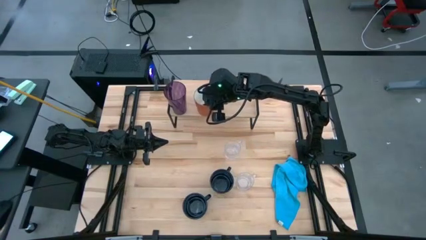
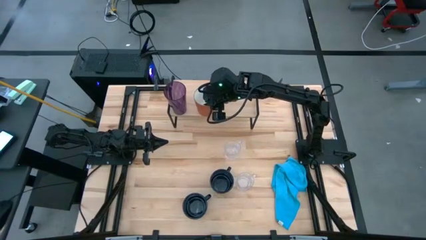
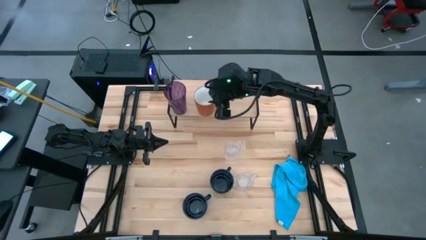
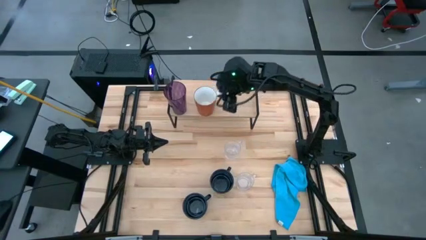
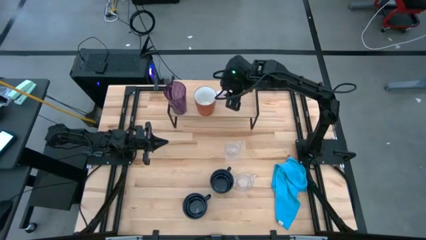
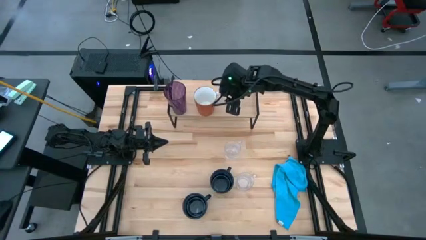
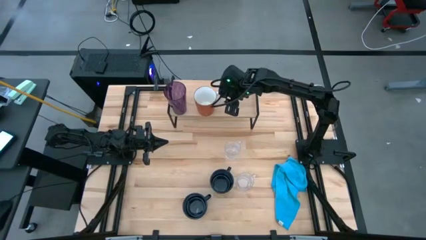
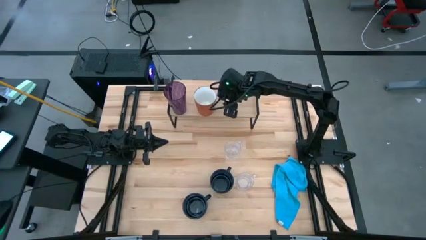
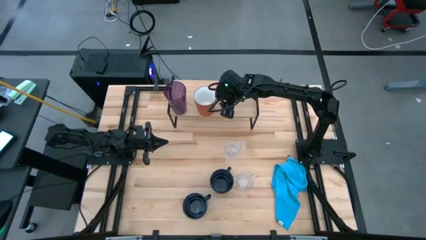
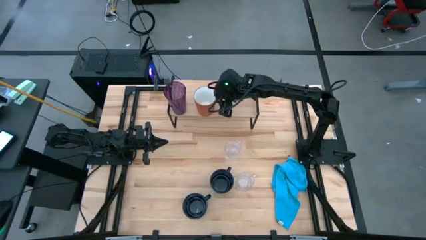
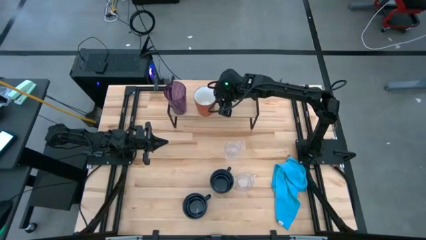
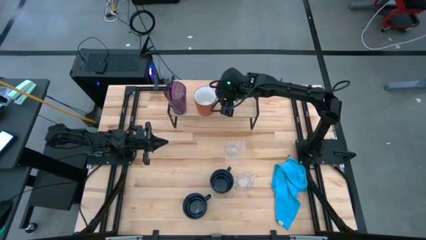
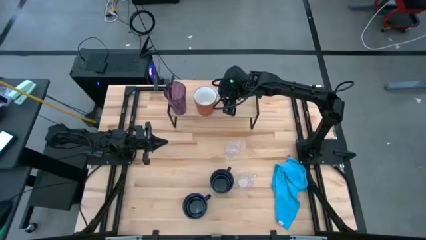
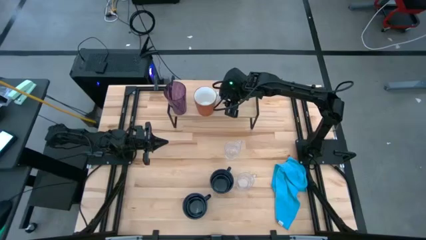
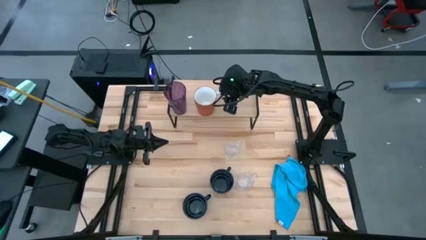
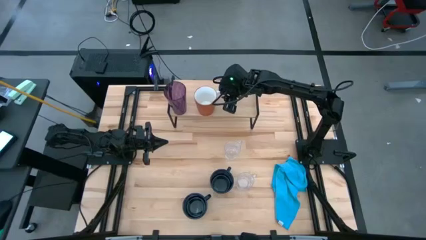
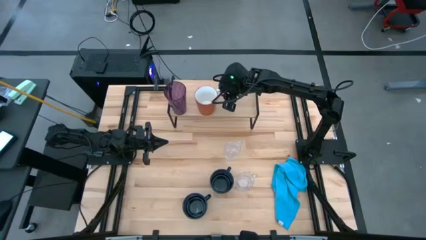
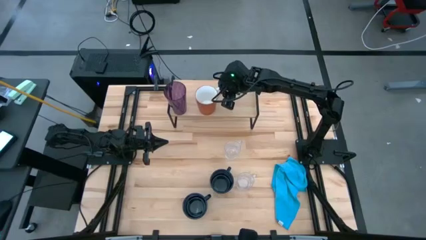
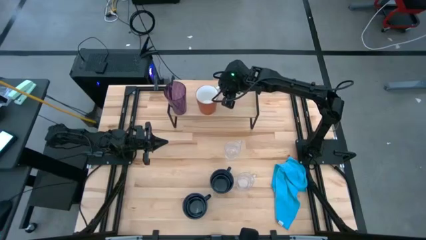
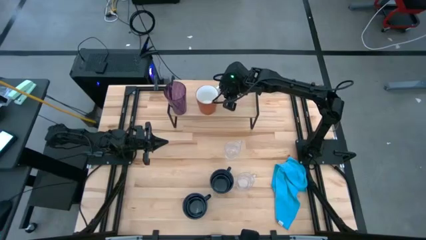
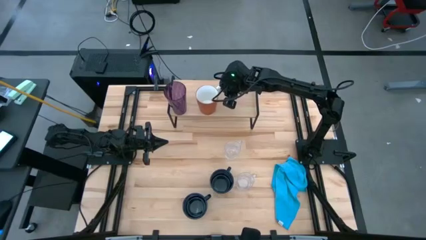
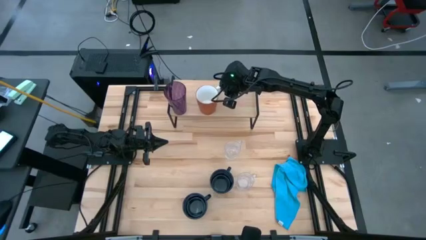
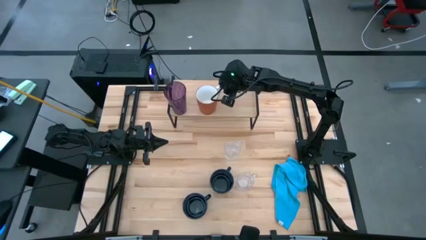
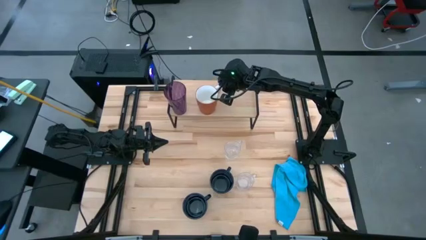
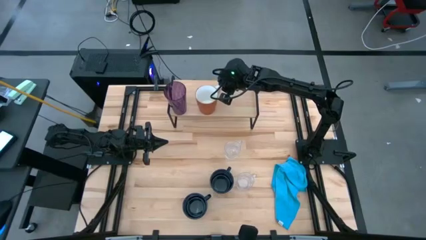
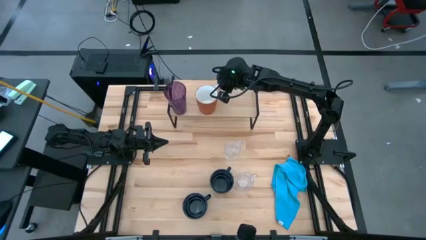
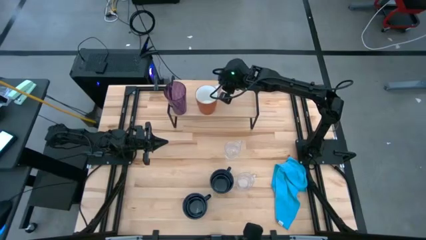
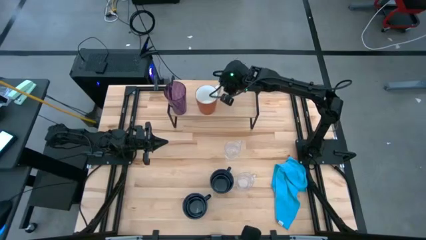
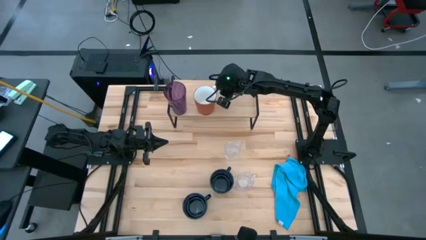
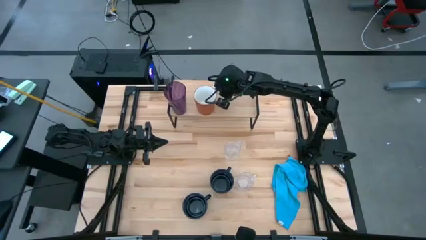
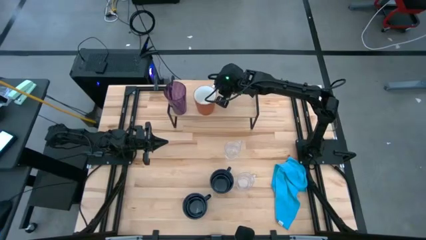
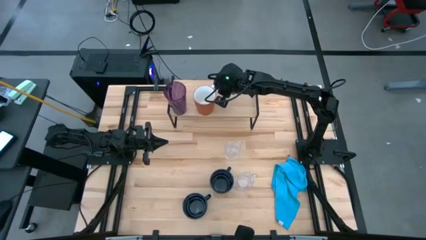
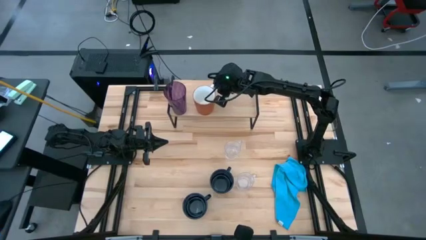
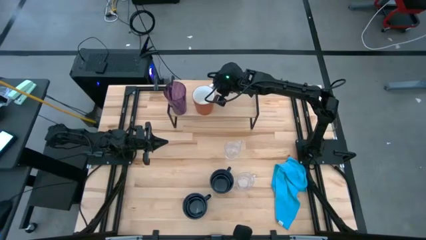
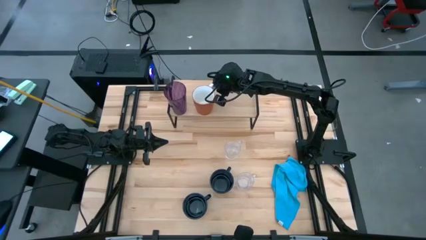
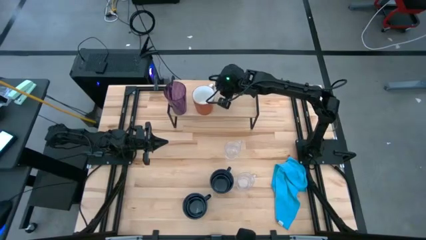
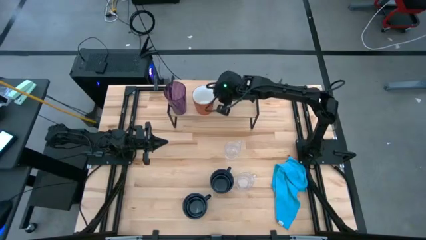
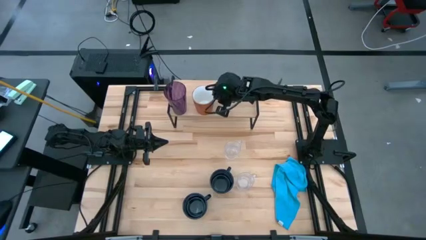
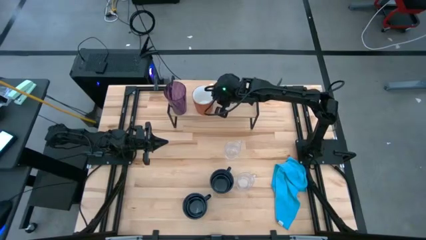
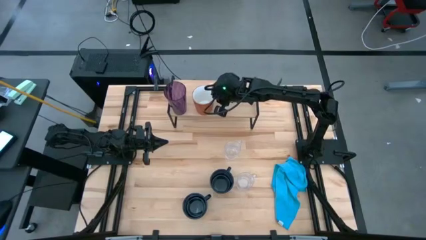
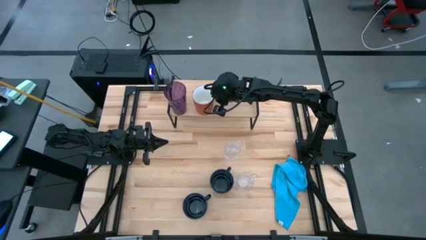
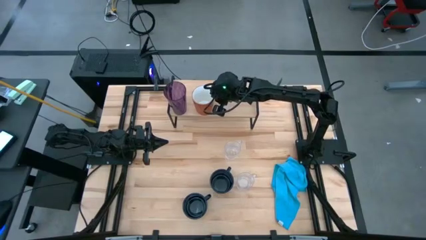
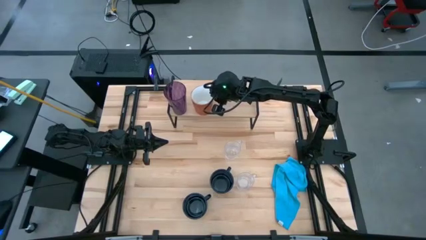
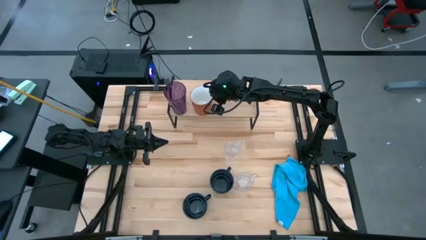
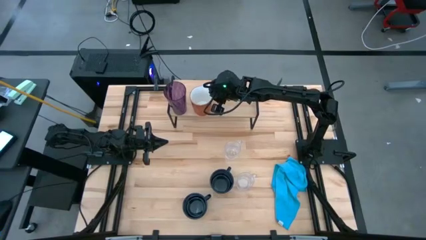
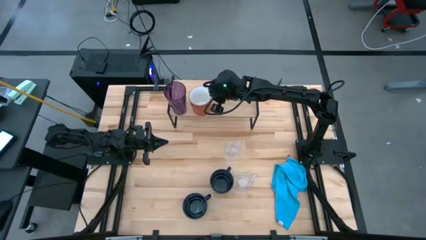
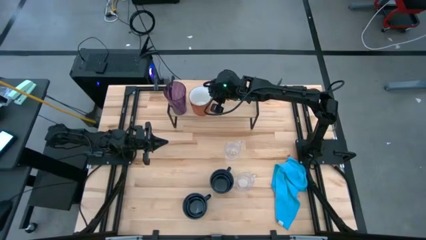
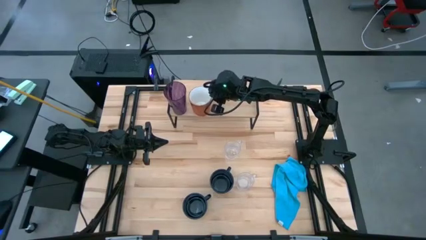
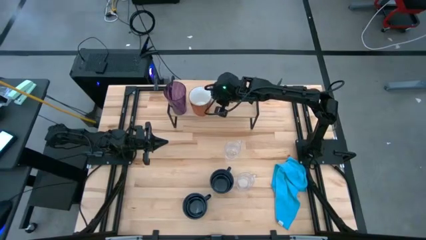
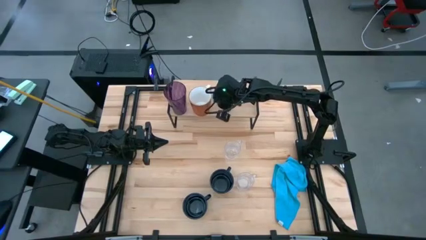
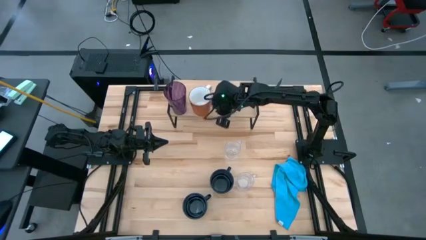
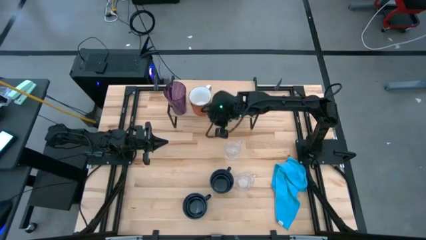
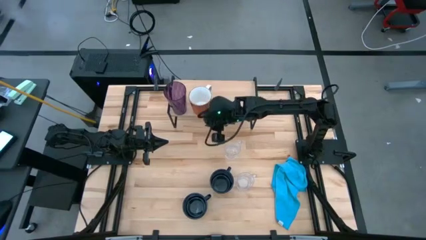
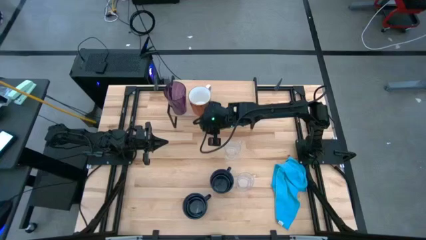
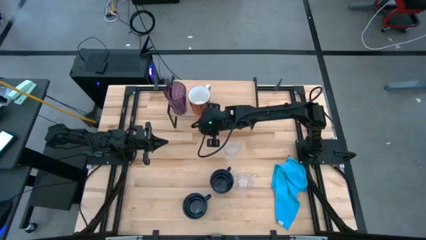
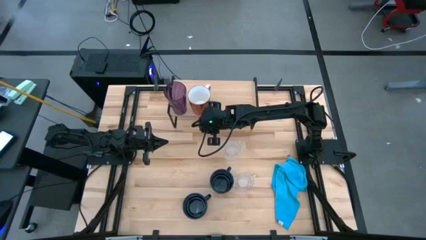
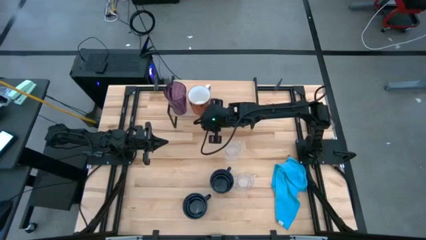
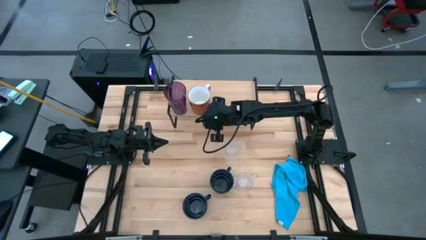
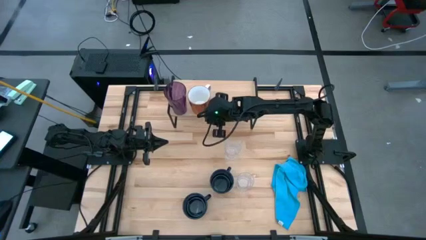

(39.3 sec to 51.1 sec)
Task: Stack small to large cups/mugs on shelf
Put the brown mug on the shelf

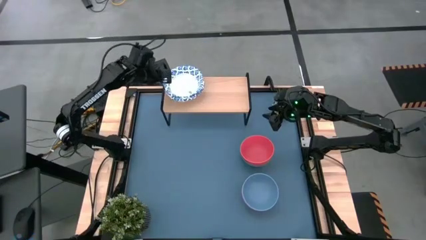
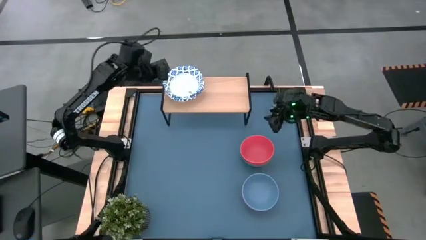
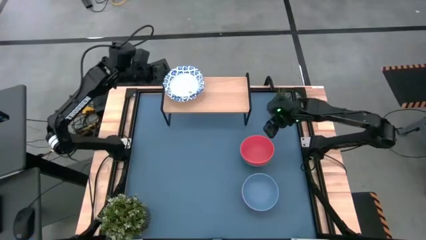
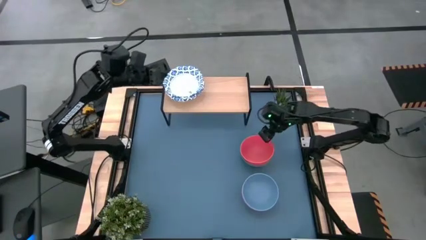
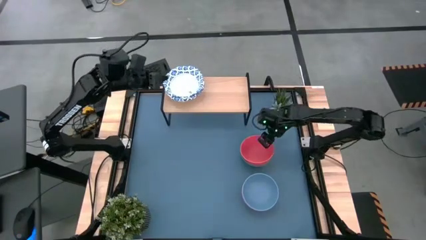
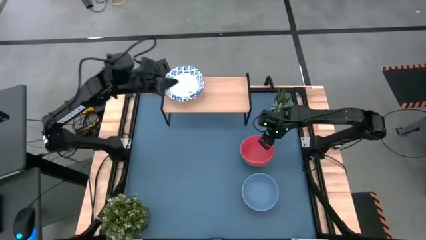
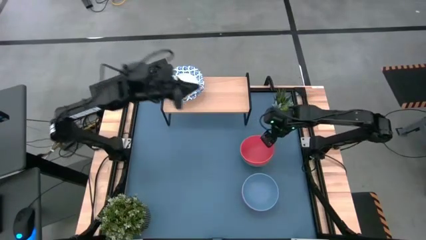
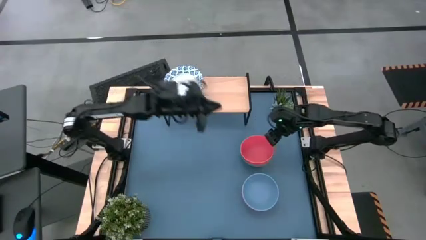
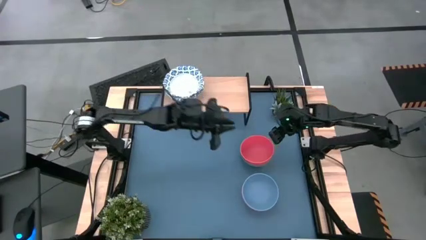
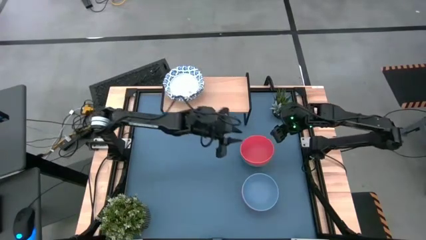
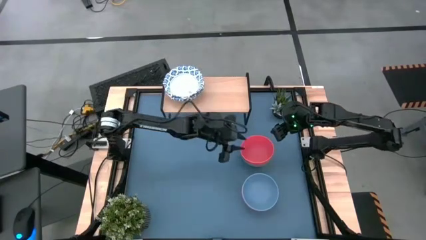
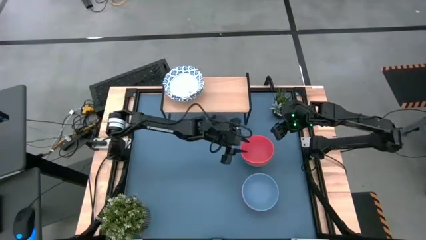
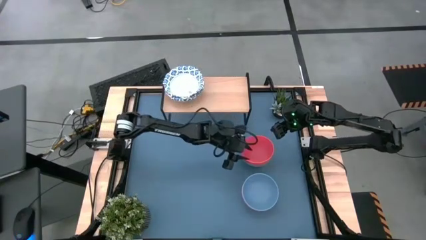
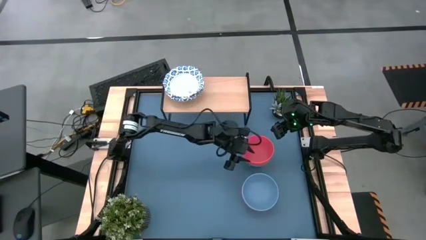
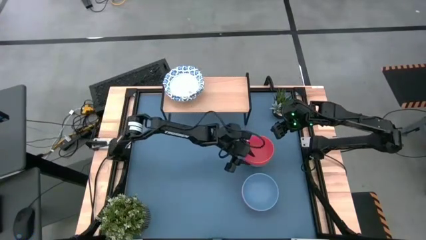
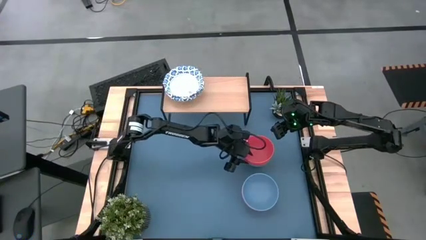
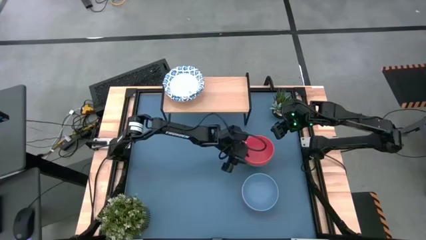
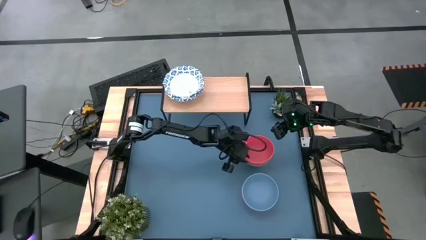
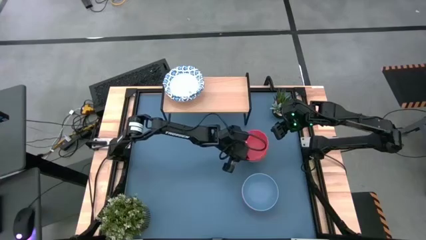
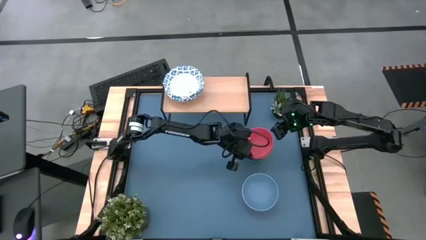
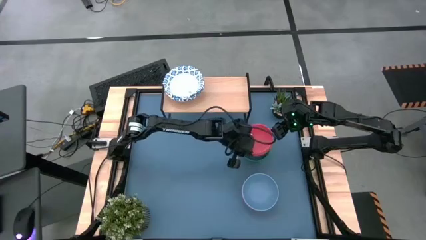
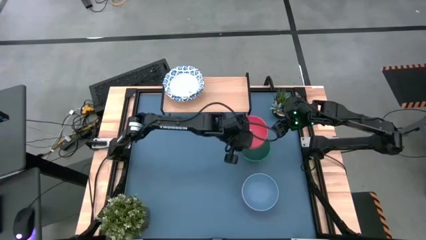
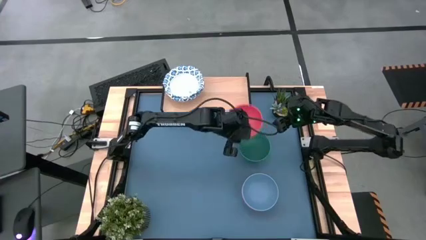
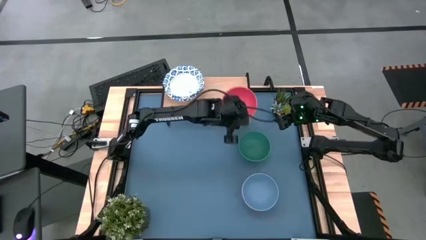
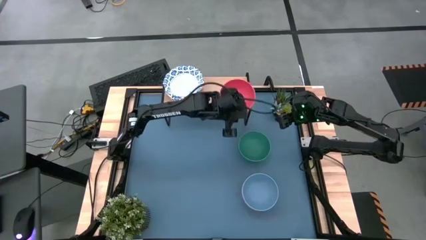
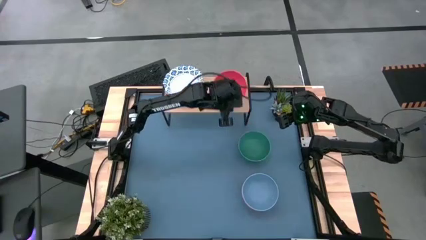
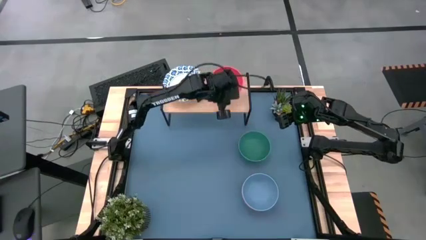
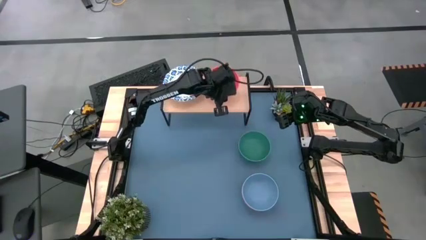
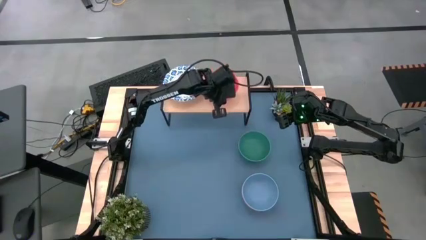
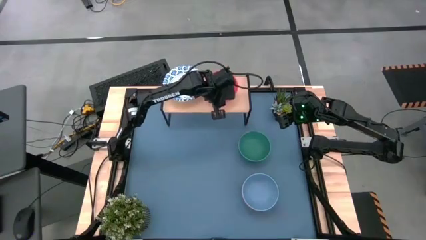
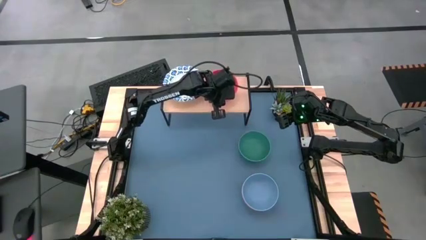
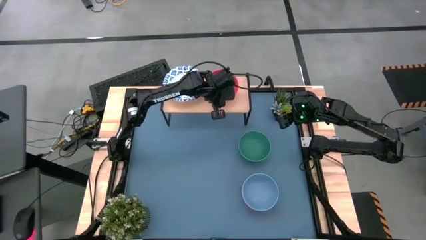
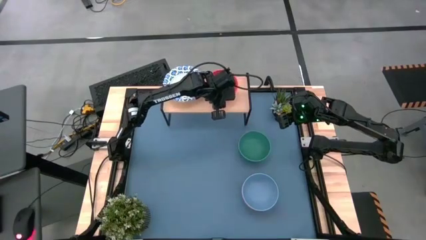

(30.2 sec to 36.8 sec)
Task: Place and stack bowls onto a shelf
Put the orange bowl on the shelf
